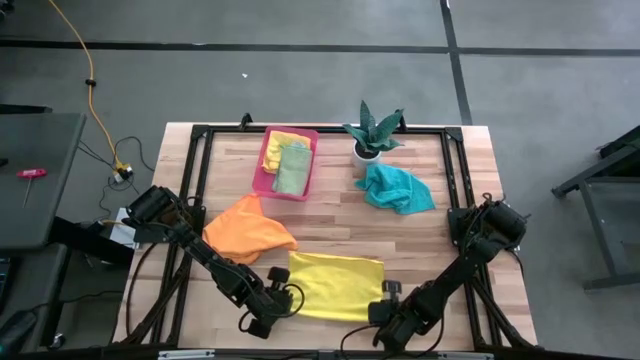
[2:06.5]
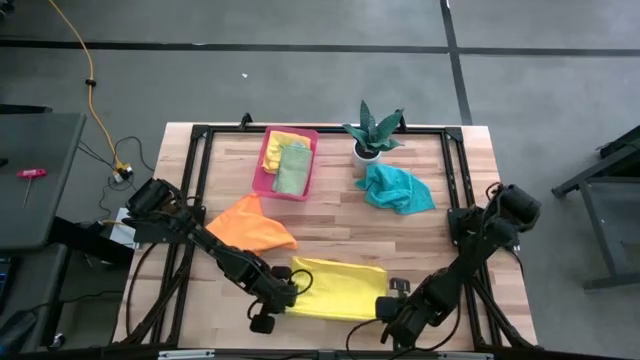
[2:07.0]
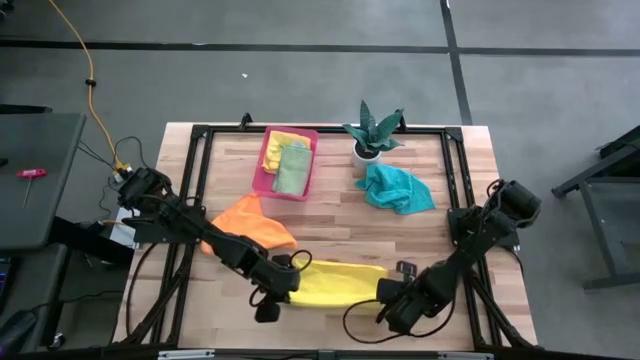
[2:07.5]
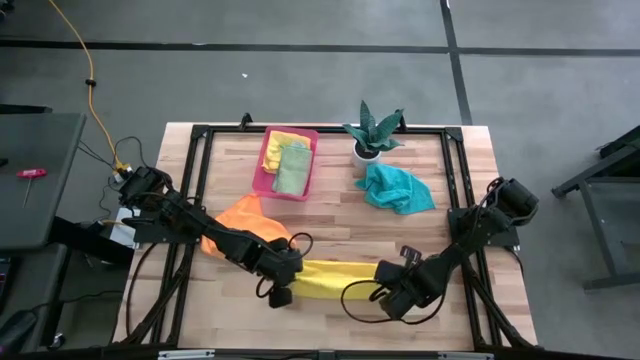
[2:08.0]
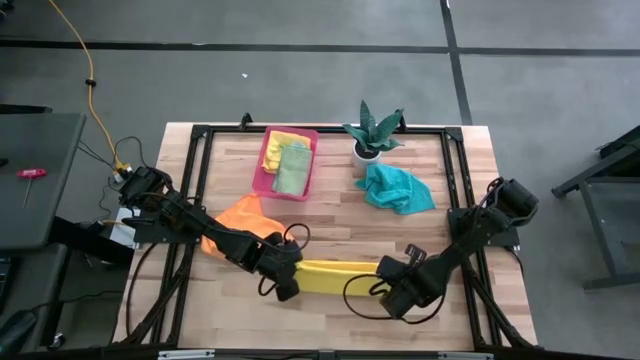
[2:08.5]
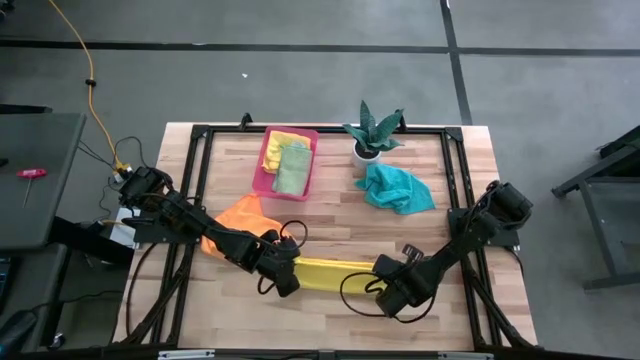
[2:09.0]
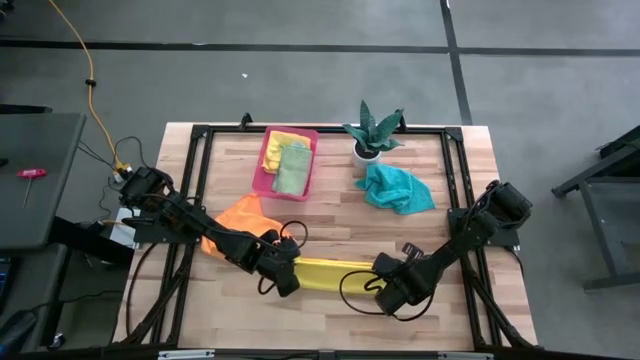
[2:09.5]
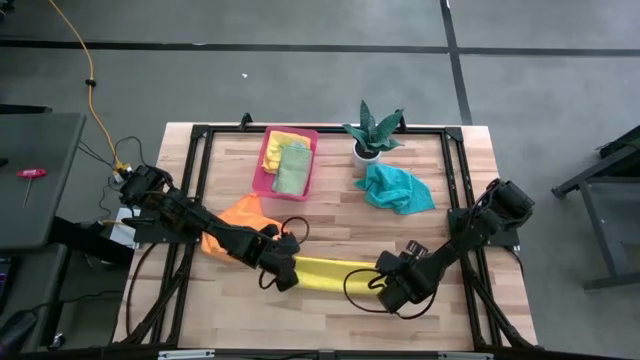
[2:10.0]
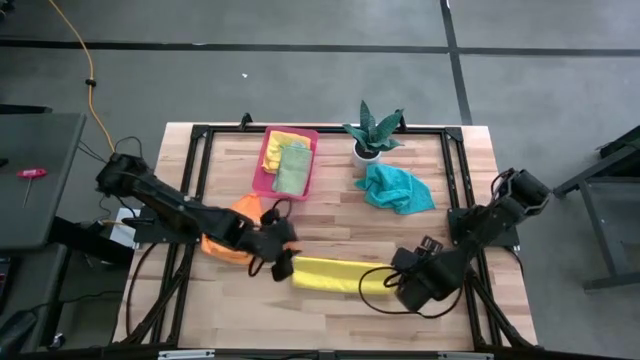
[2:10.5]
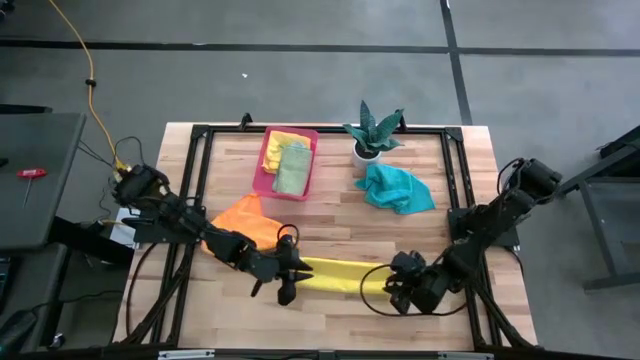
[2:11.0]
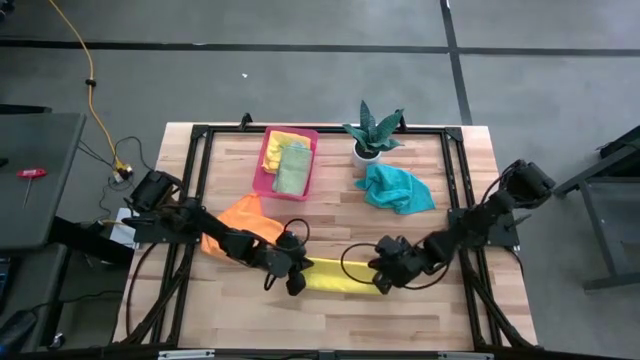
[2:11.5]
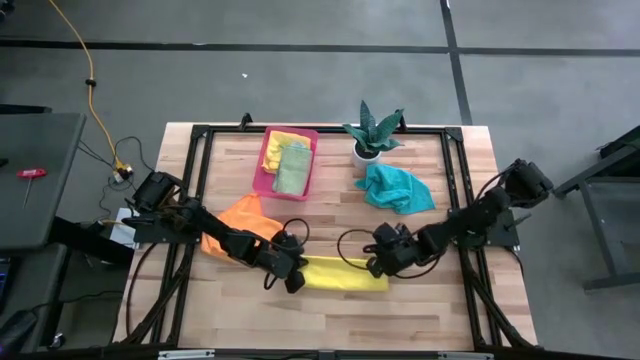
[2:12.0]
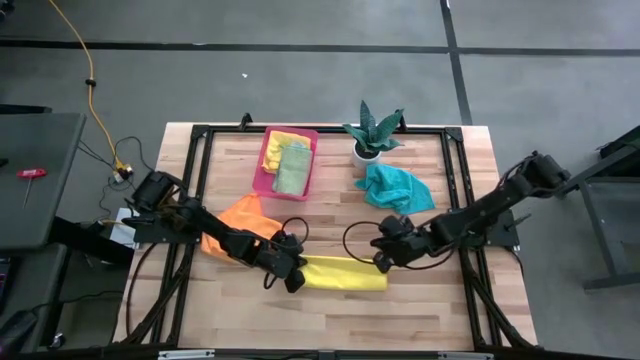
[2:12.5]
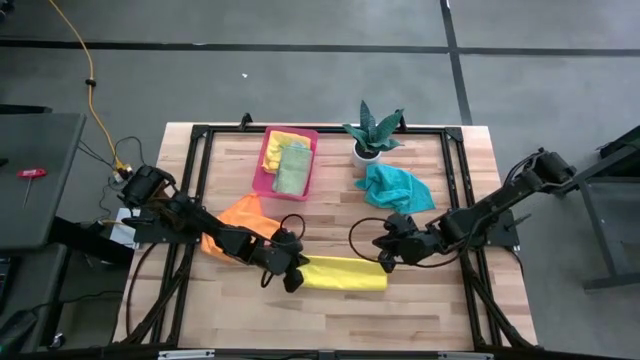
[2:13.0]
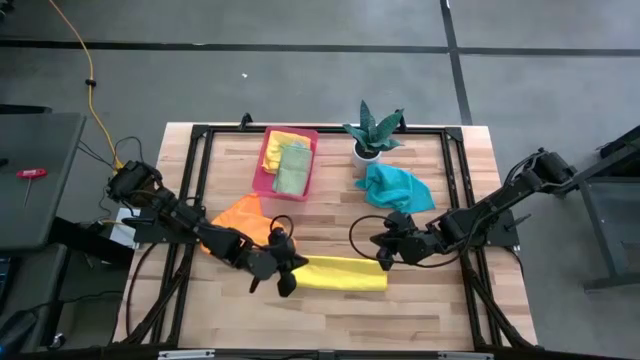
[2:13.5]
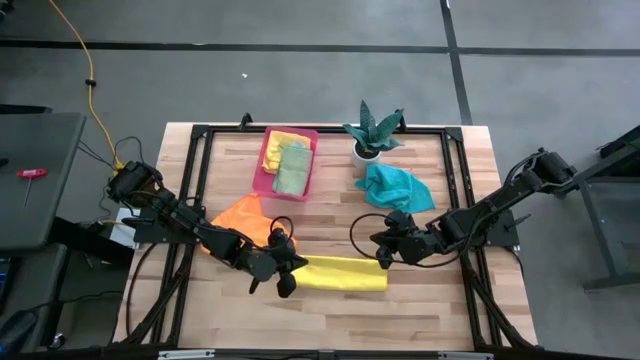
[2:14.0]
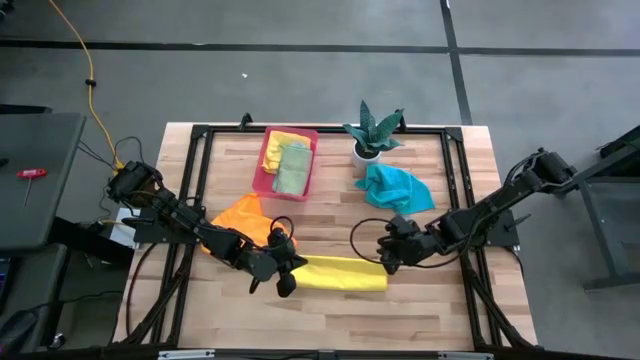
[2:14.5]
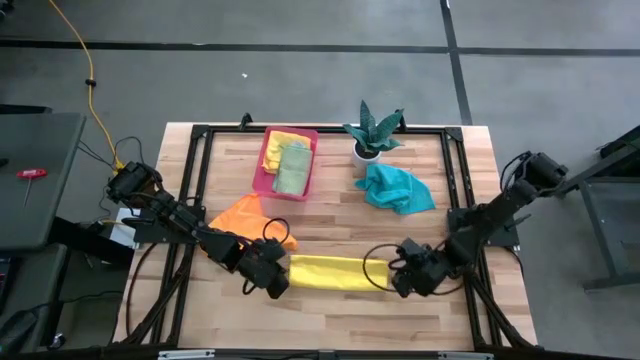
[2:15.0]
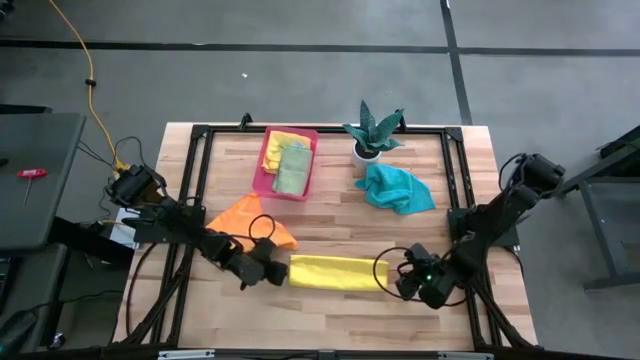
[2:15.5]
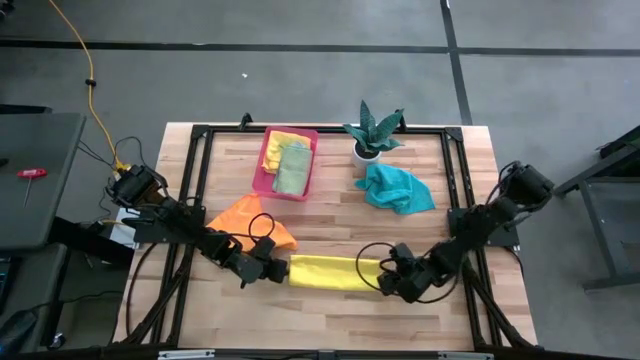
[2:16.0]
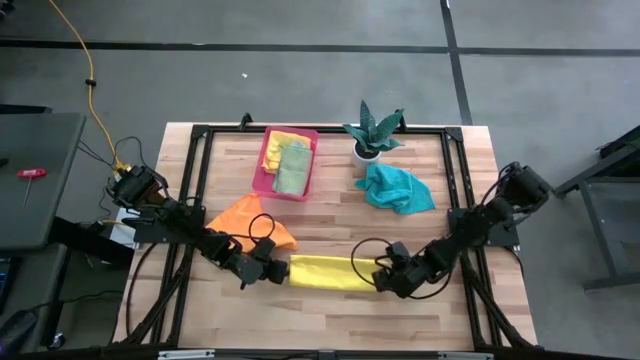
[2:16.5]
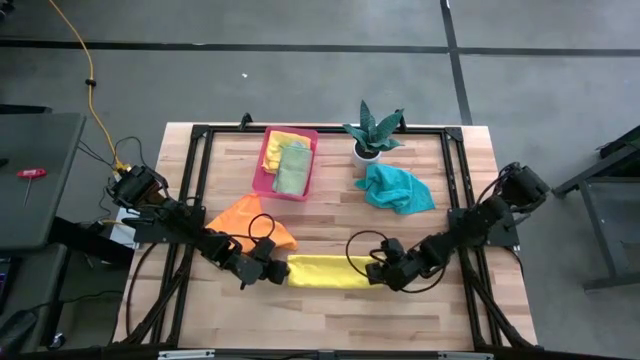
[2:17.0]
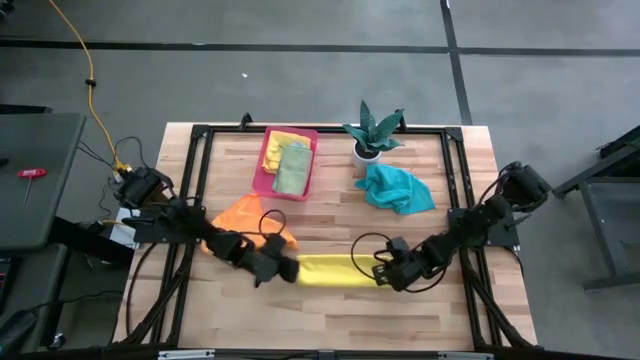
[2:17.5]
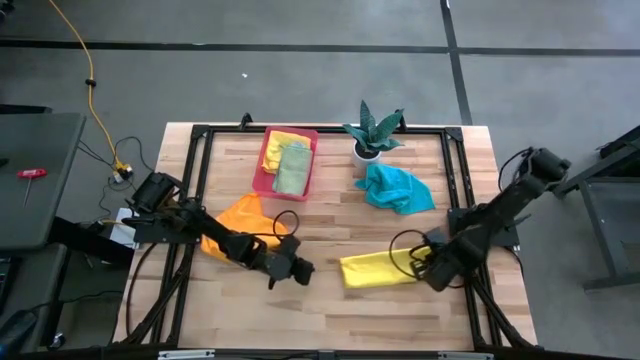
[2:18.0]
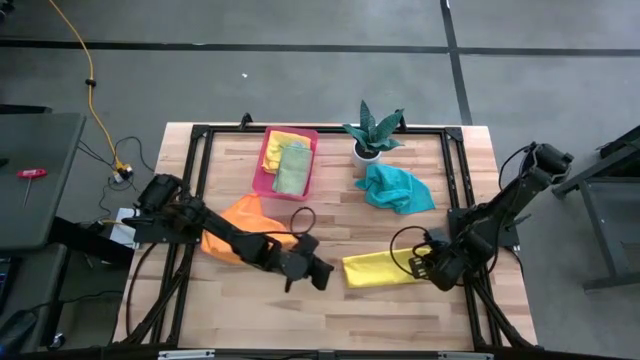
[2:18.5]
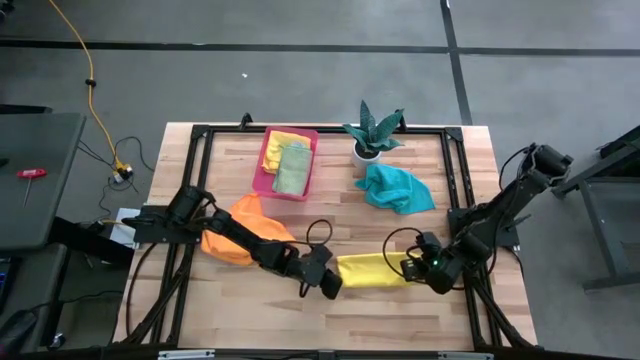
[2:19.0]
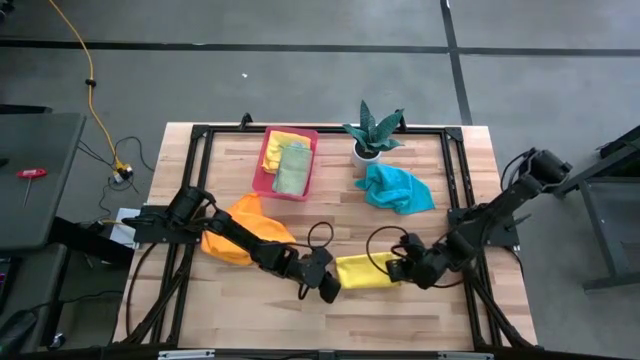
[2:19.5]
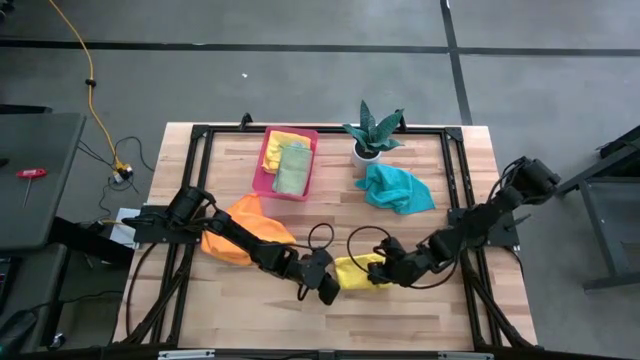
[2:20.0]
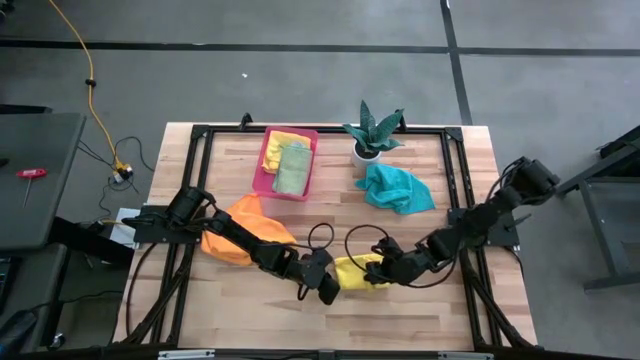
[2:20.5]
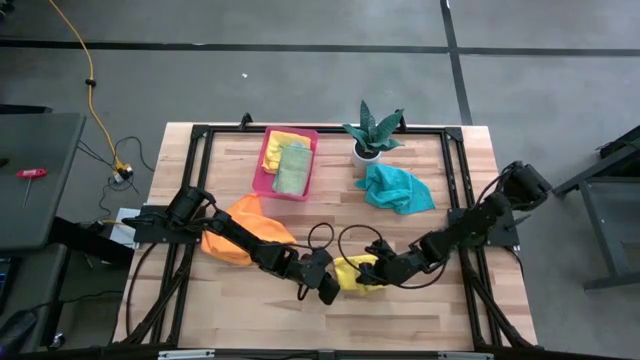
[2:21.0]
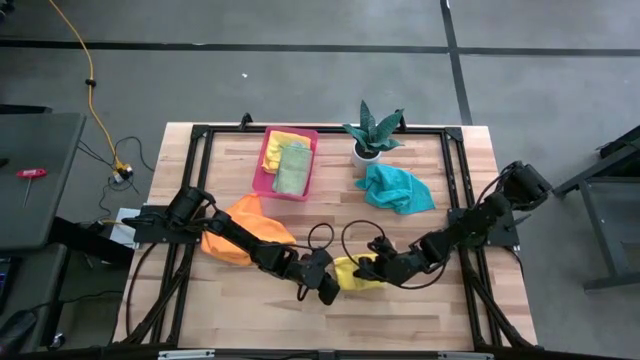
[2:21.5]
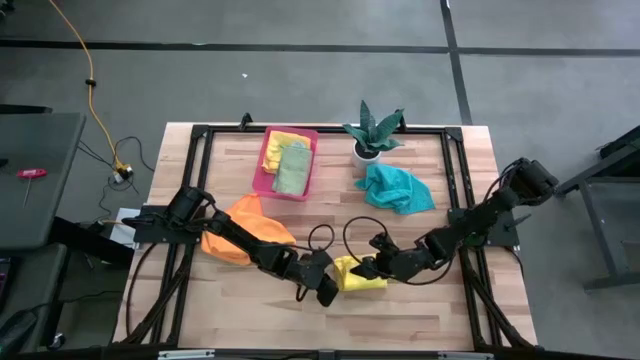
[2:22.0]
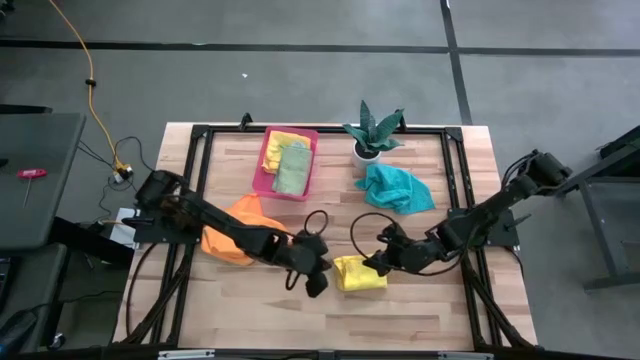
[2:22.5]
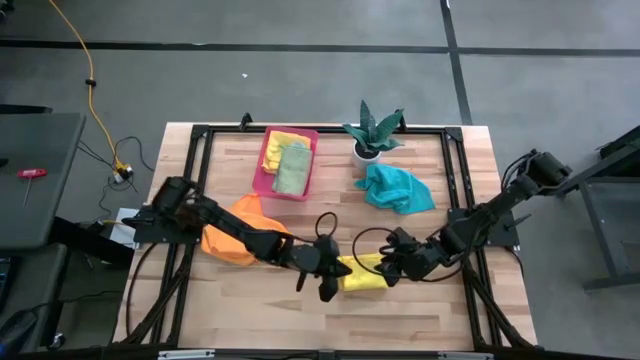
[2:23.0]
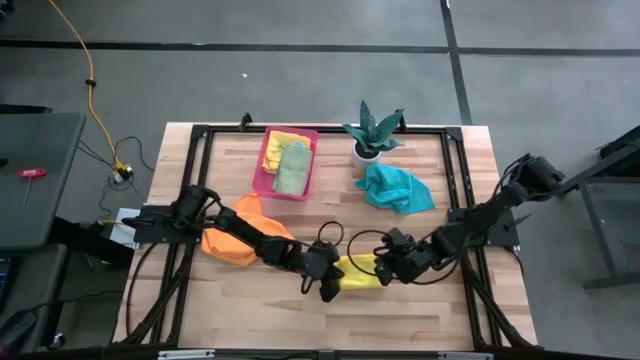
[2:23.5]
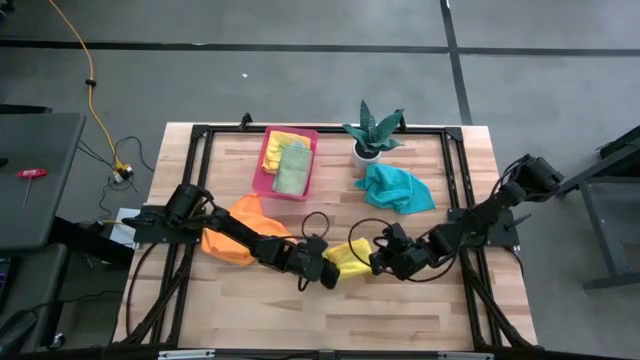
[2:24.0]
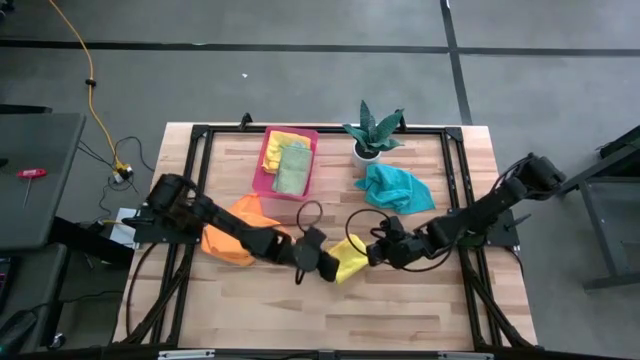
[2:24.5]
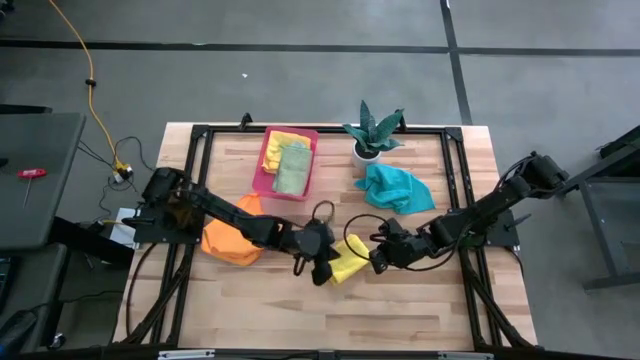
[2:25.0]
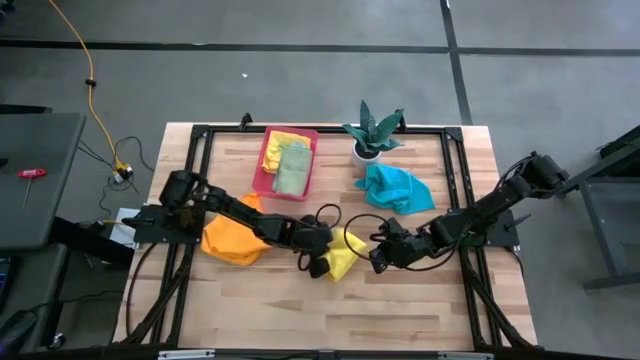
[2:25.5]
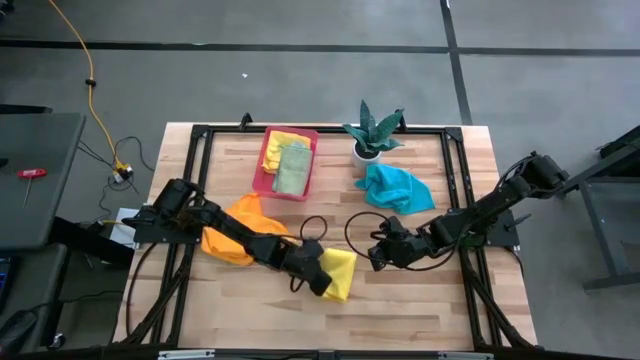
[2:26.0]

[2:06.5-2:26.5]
Task: Fold microfiber towels
Fold the yellow microfiber cloth
